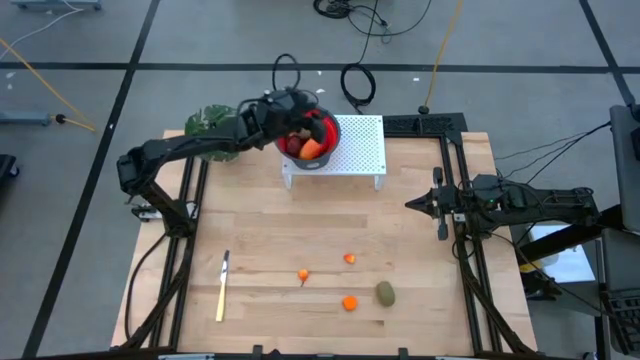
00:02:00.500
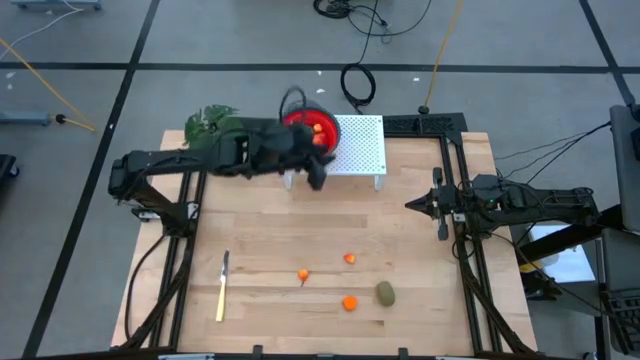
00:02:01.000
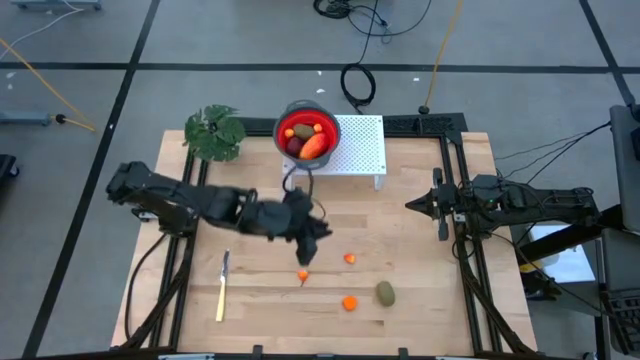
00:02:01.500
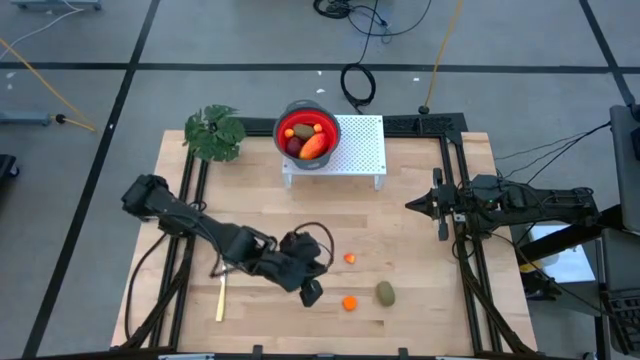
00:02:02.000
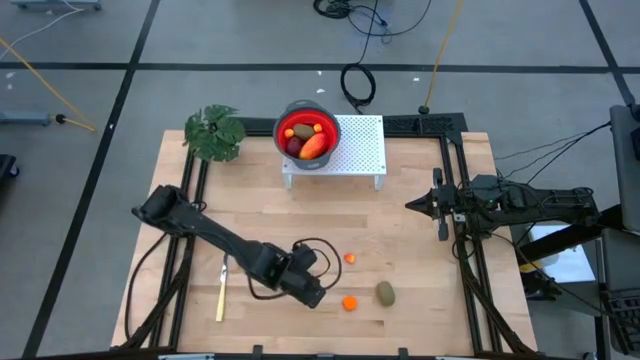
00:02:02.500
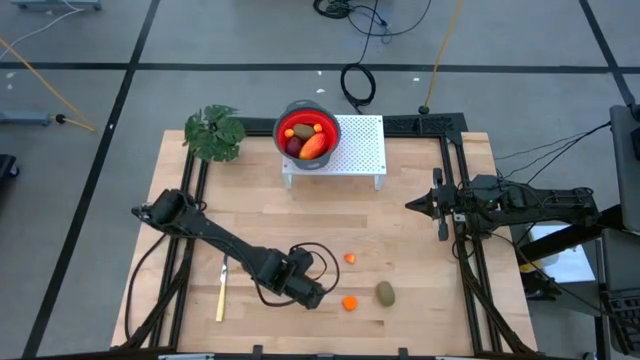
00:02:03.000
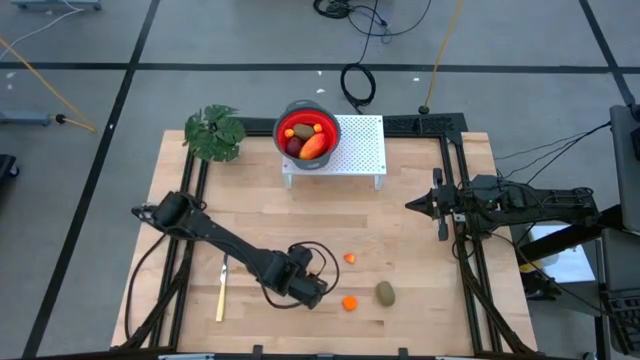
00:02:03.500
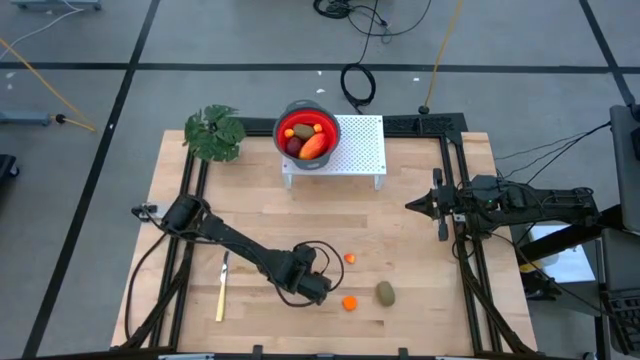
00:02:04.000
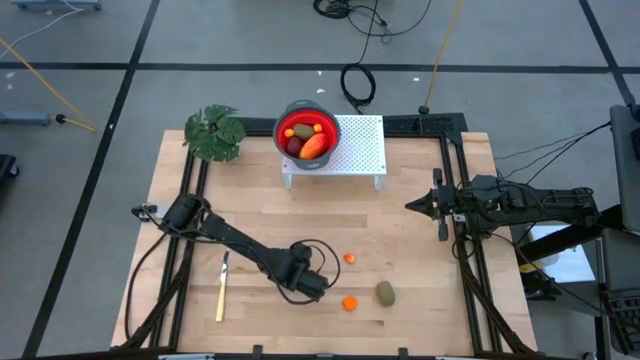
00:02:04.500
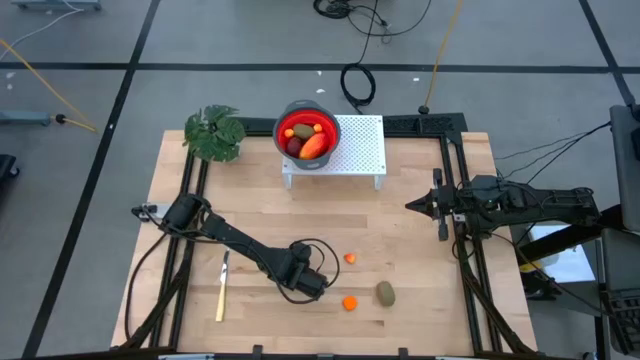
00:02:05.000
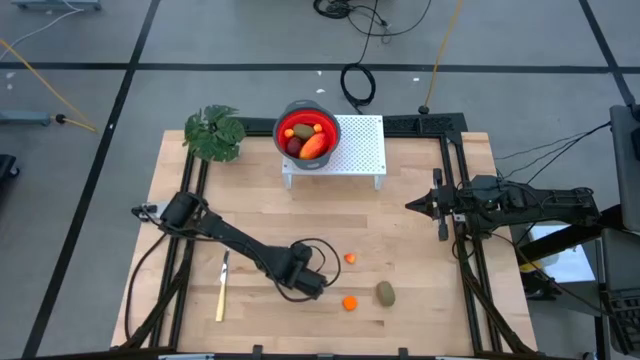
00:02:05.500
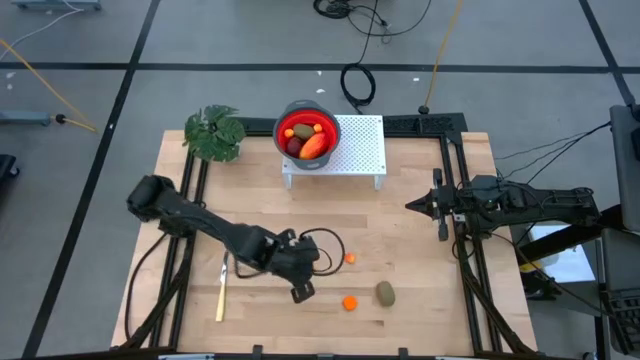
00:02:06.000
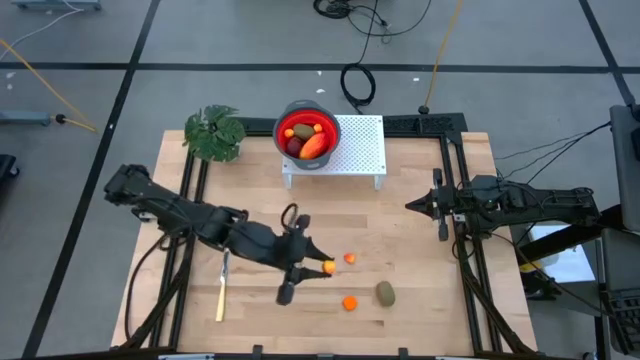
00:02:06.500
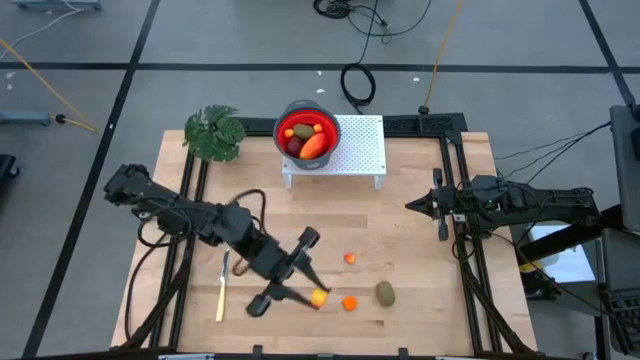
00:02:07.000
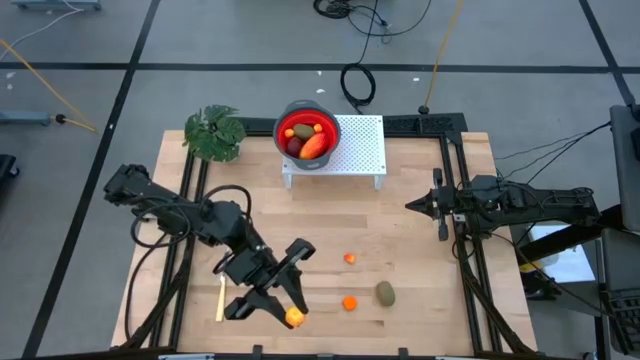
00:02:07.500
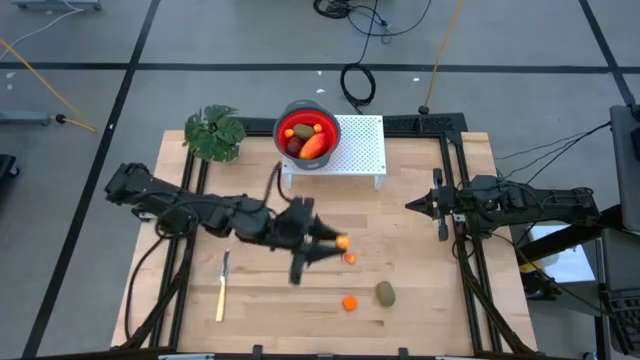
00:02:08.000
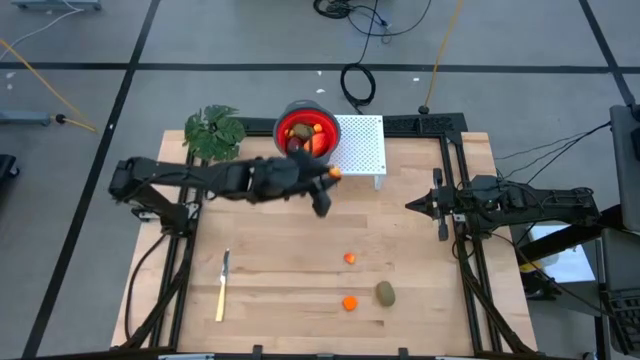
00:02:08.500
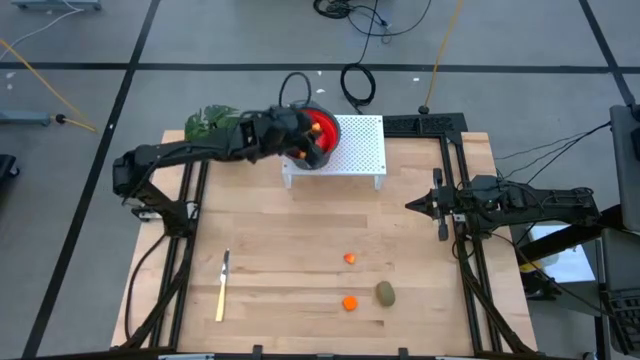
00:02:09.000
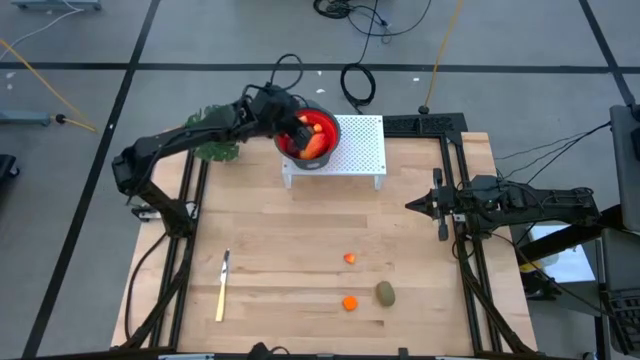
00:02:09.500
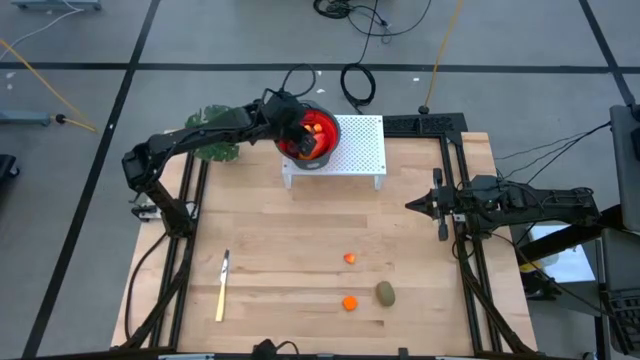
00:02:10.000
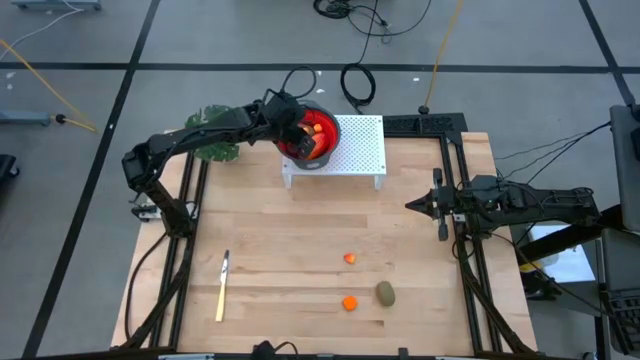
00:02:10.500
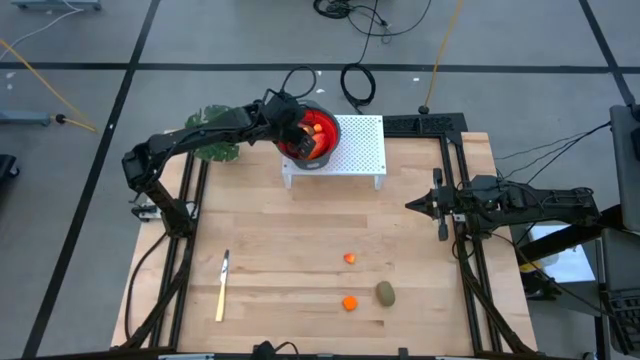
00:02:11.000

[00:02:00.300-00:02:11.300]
Task: Pick & Place Fruit
Put the pear into the red strainer bowl on the shelf

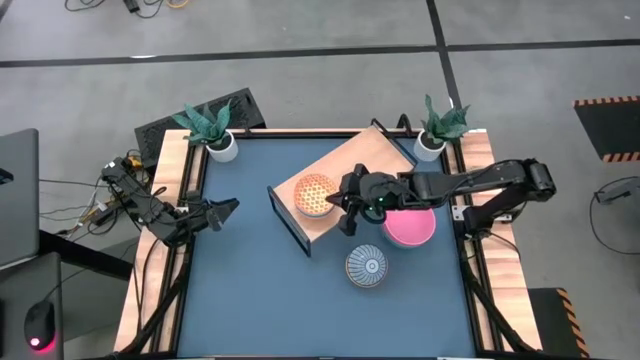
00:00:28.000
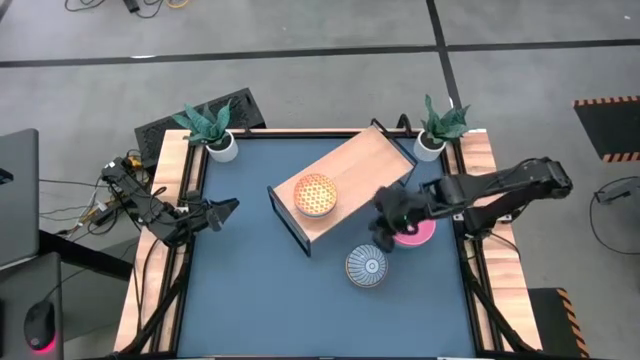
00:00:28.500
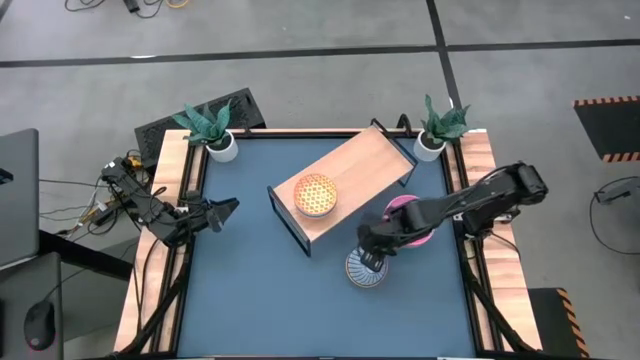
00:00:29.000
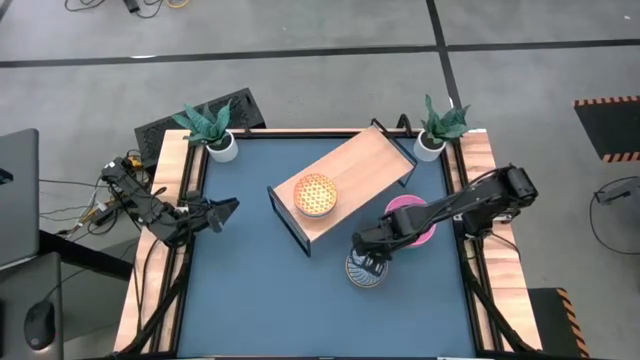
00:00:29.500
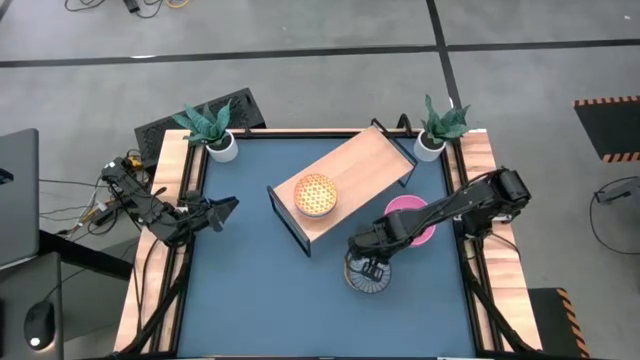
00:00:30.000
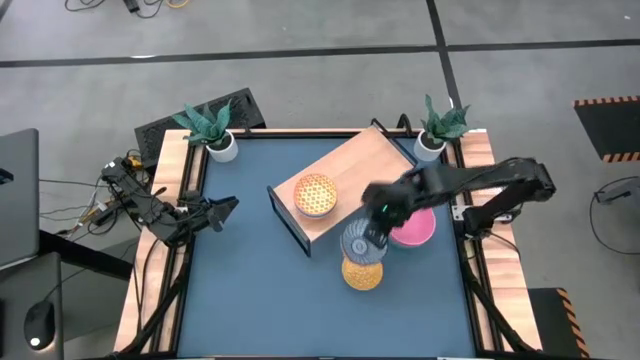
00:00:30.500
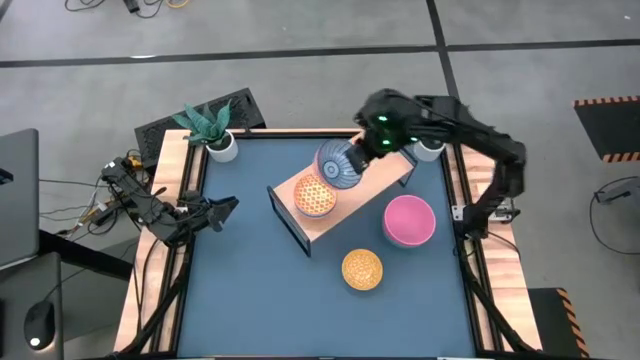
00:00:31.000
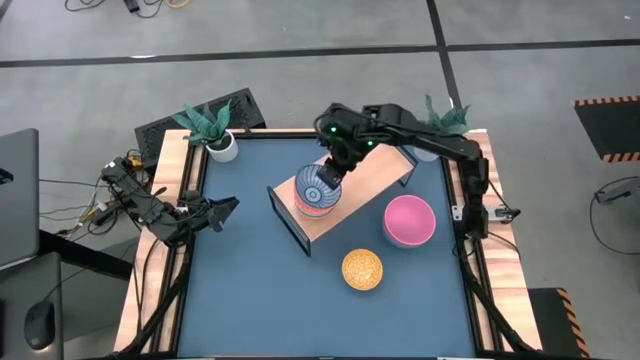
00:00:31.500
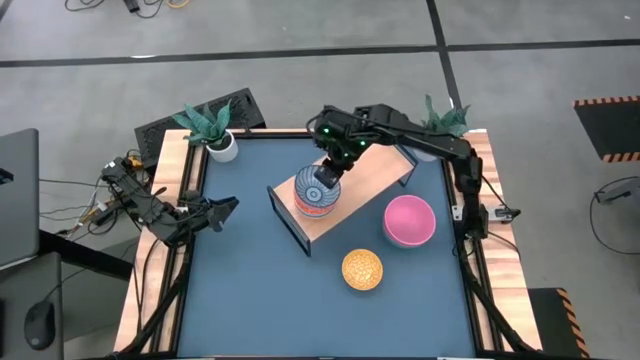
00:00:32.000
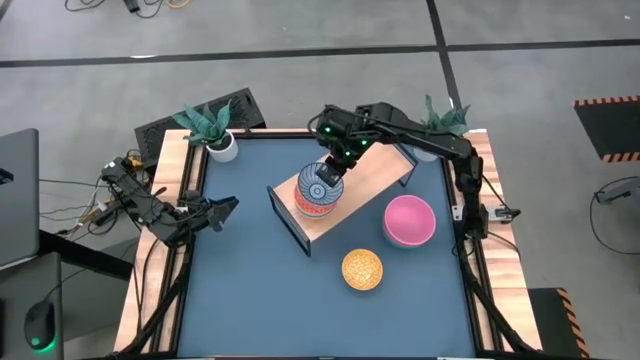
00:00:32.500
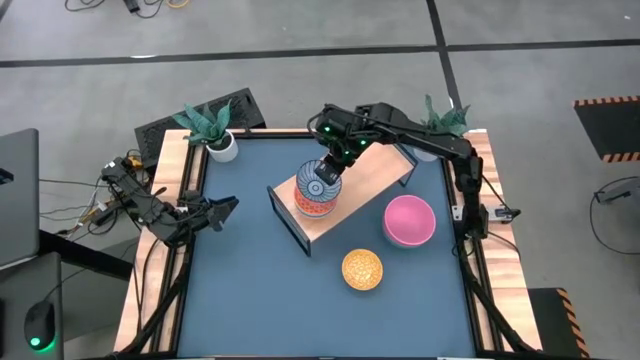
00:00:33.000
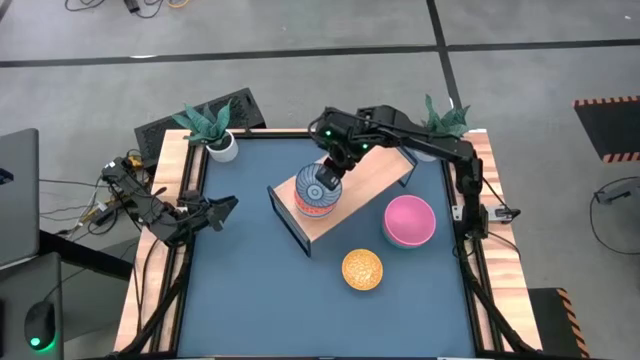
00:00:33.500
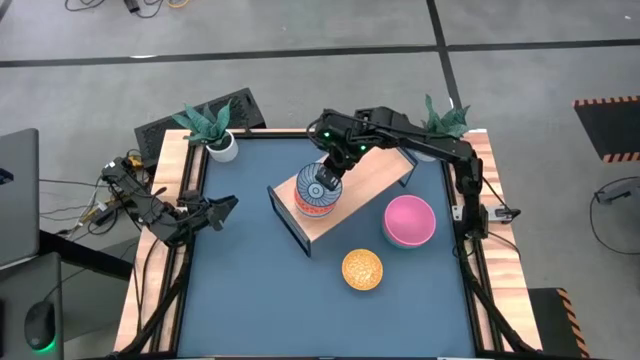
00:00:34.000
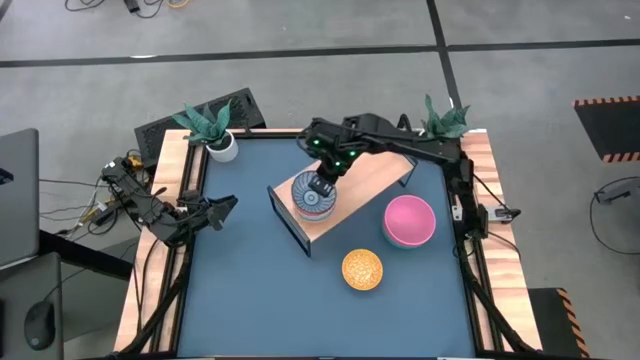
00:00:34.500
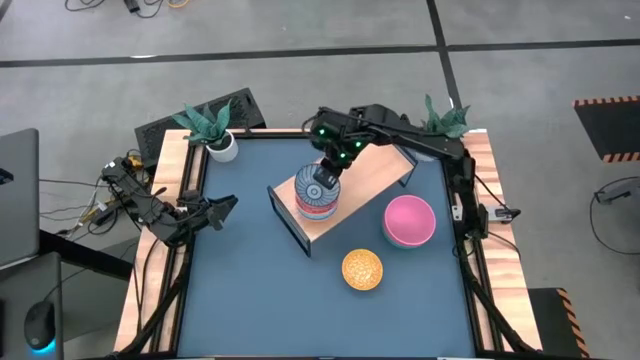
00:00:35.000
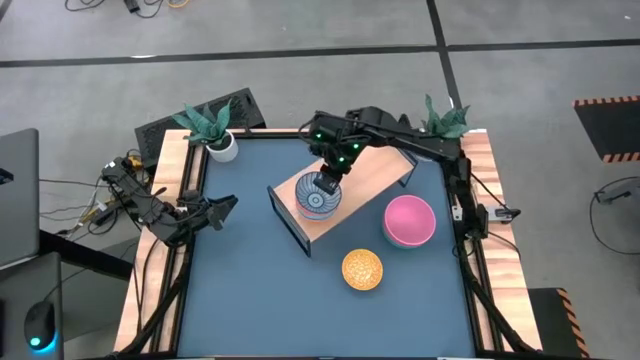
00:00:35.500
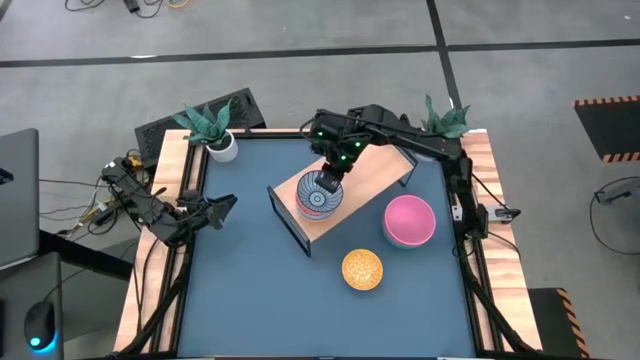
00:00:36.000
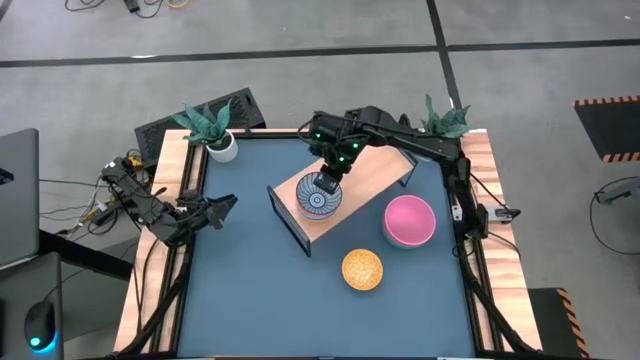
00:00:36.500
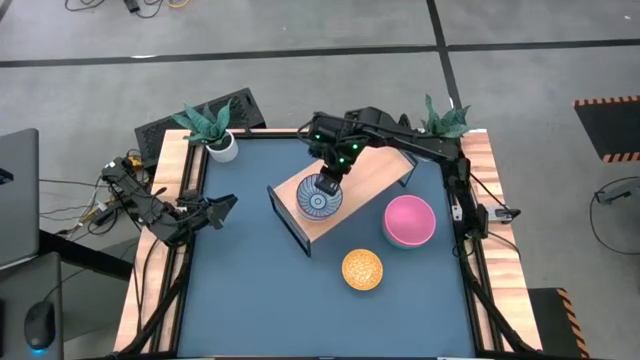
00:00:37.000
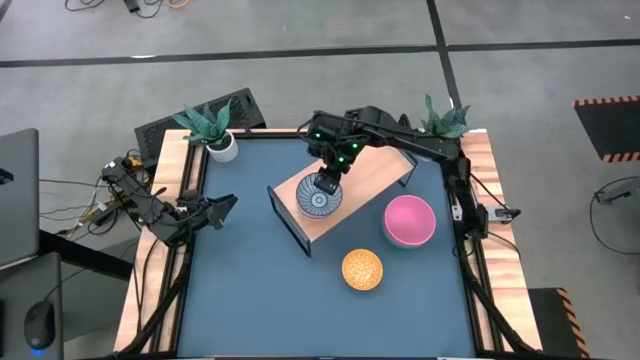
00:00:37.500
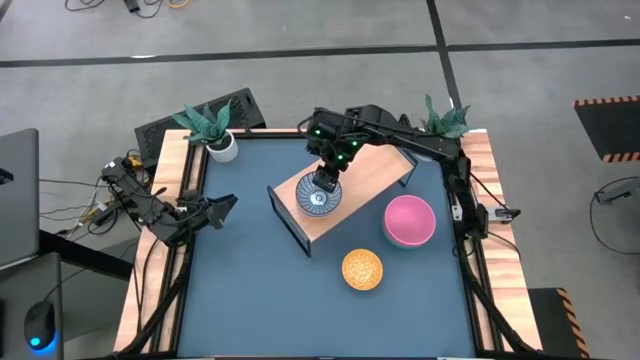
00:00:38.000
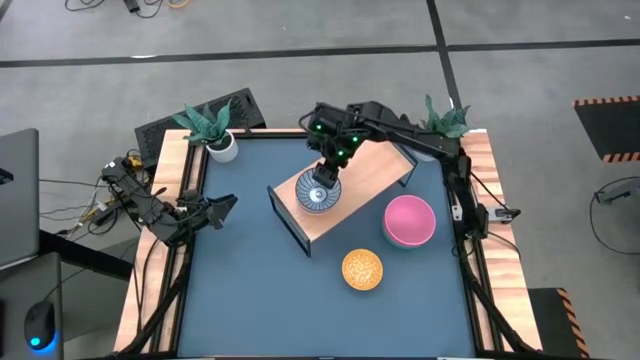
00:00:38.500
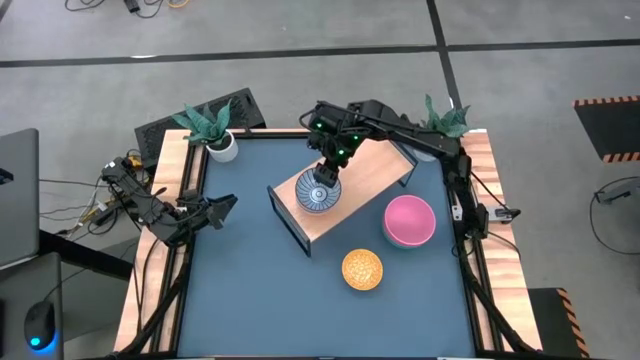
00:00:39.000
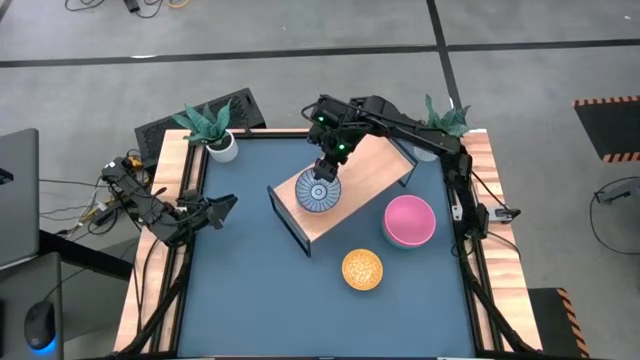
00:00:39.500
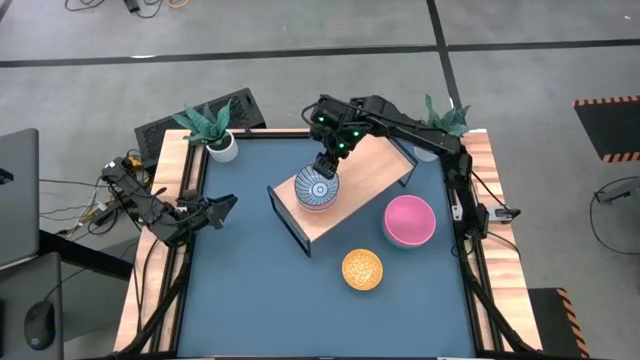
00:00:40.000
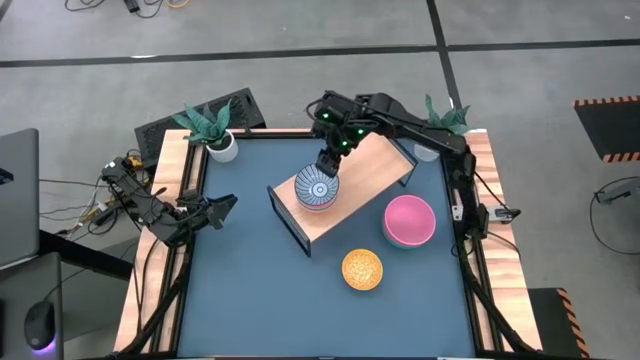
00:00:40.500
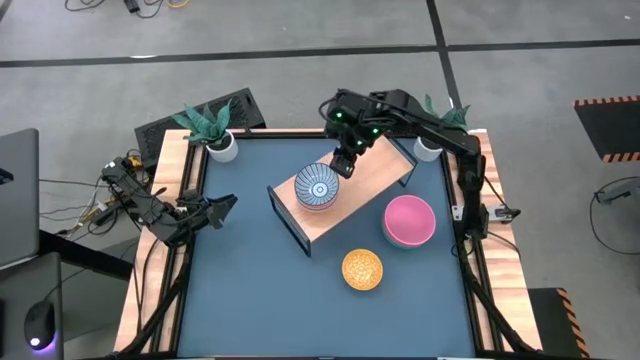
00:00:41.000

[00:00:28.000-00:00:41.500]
Task: Place and stack bowls onto a shelf
Stack the dark patterned blue bowl on top of the orange patterned bowl on the shelf
